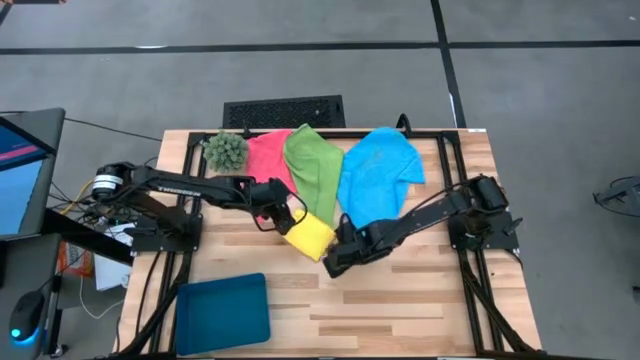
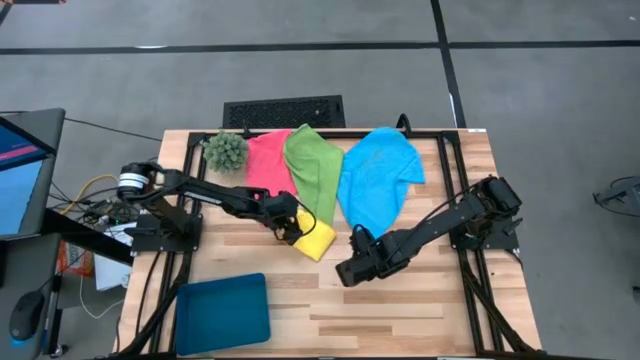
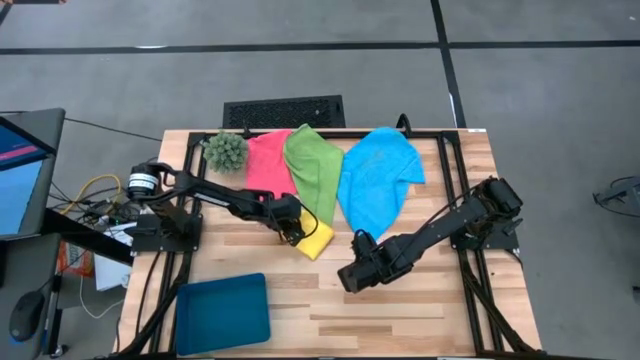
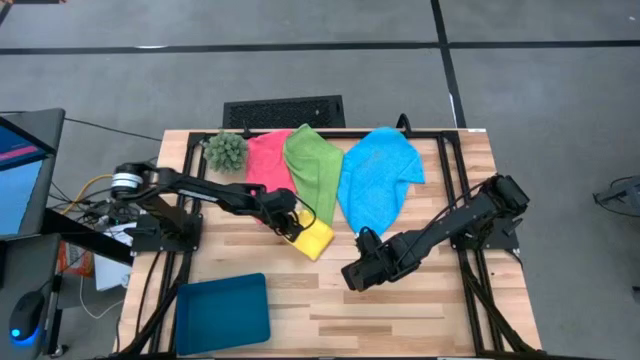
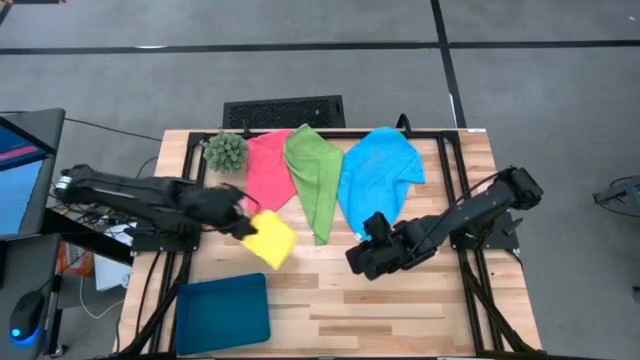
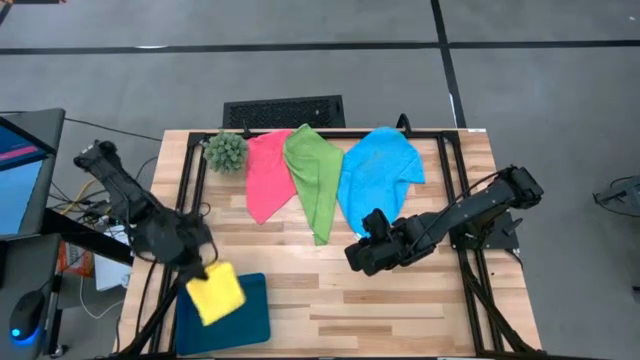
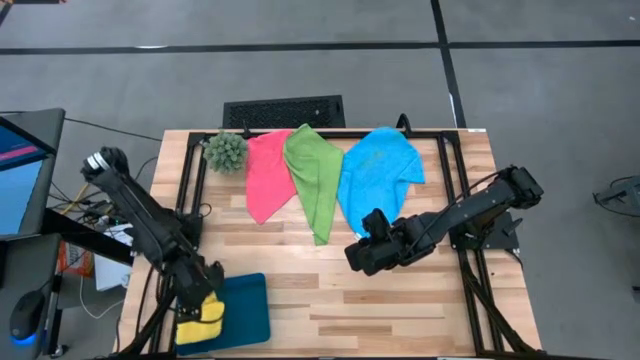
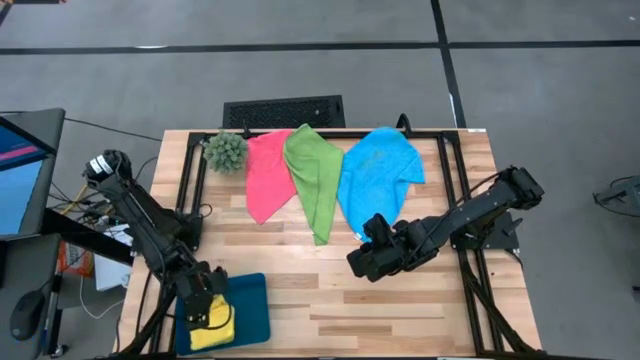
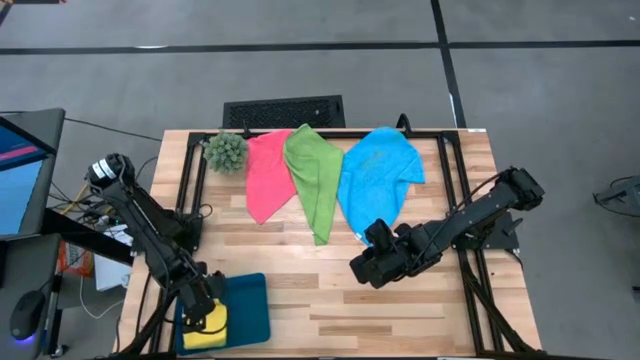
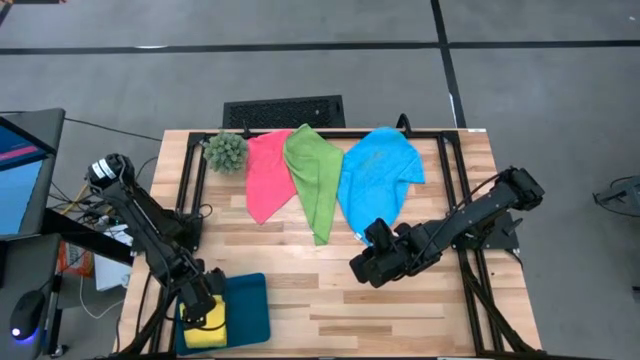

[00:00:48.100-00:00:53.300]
Task: Fold microfiber towels
Put the yellow microfiber towel into the bin

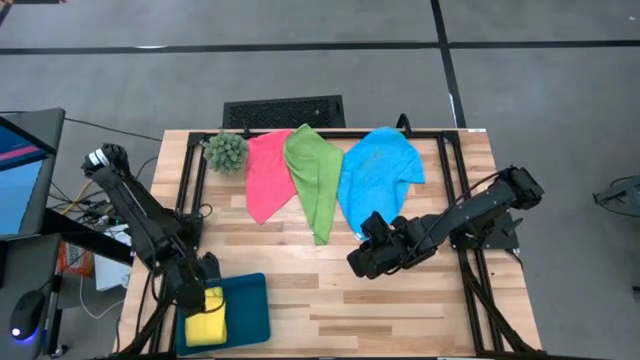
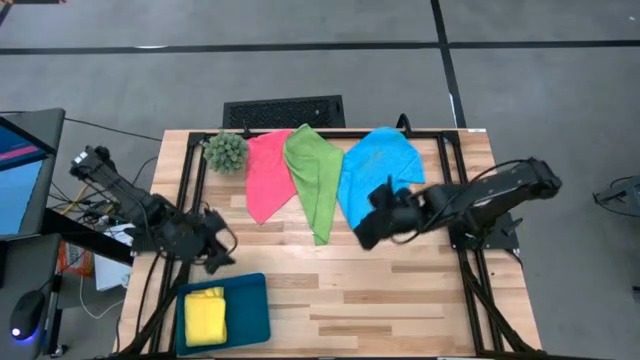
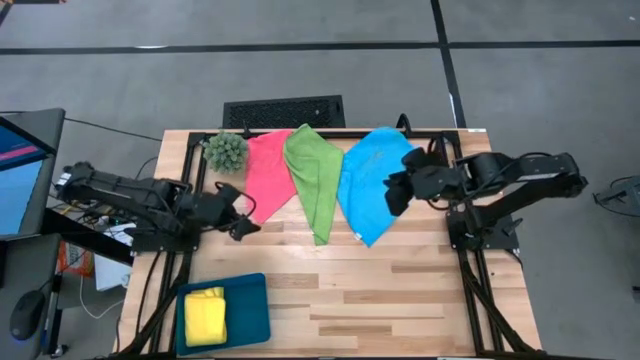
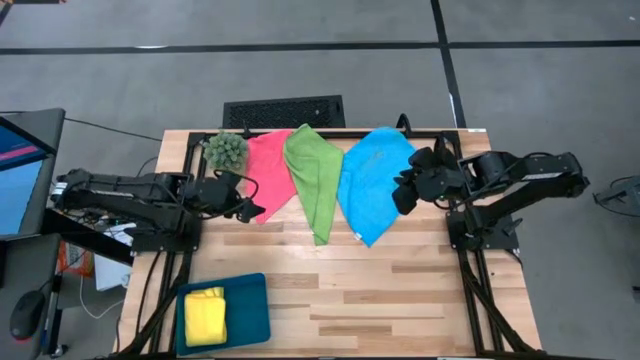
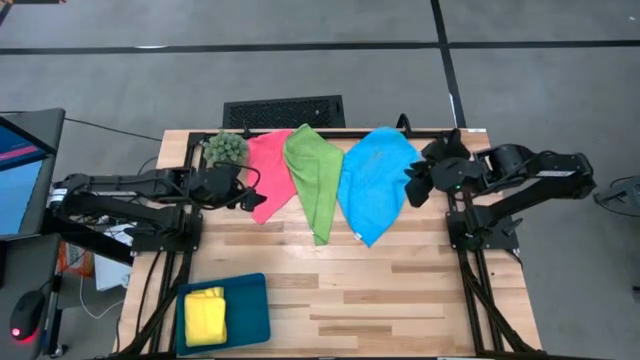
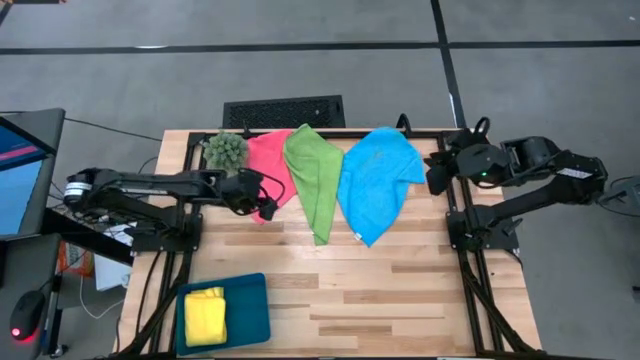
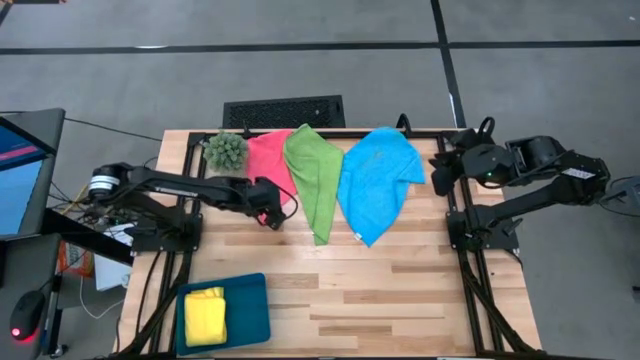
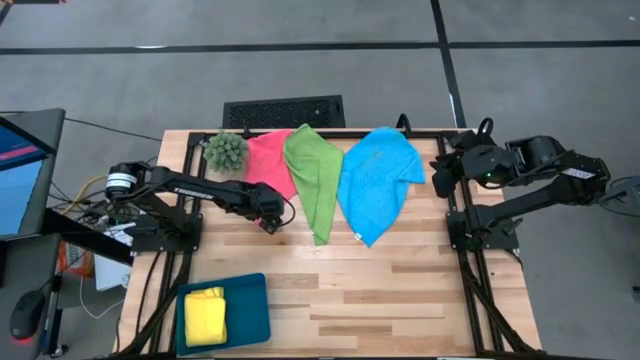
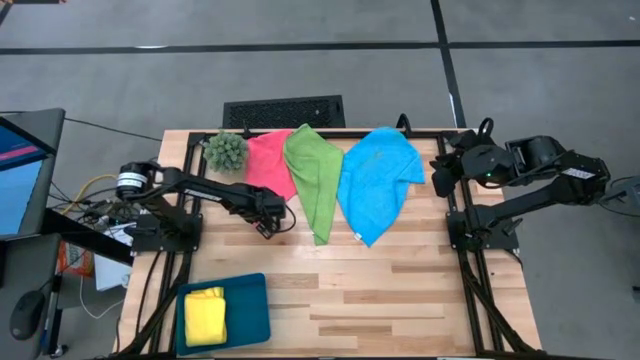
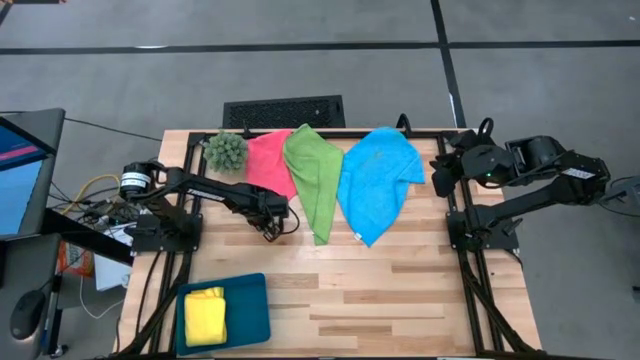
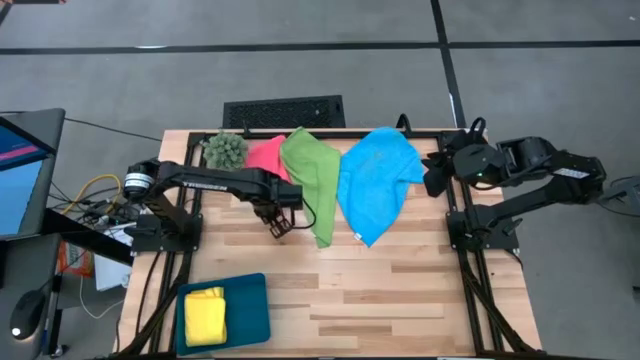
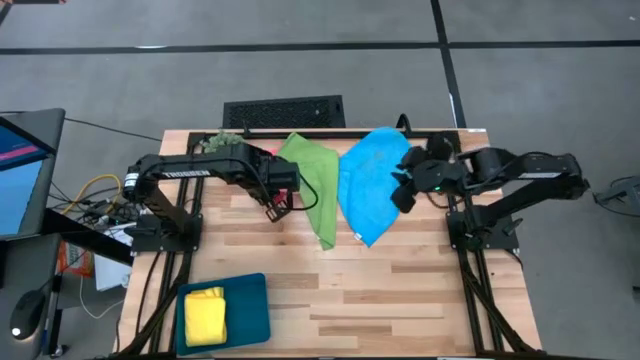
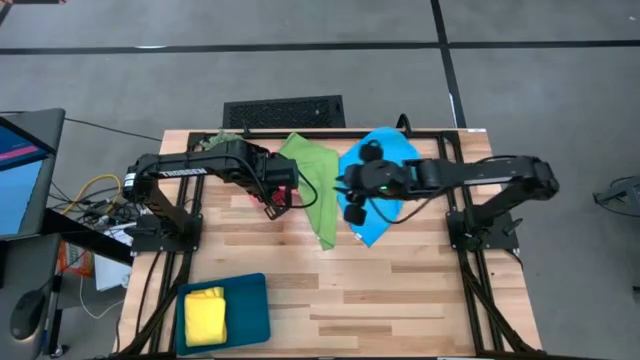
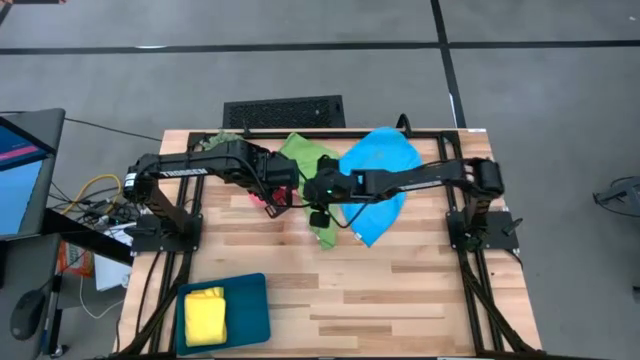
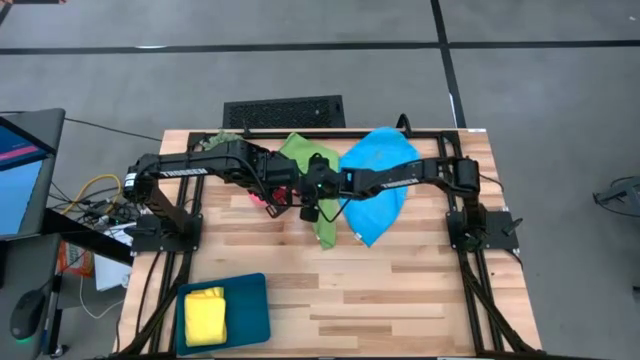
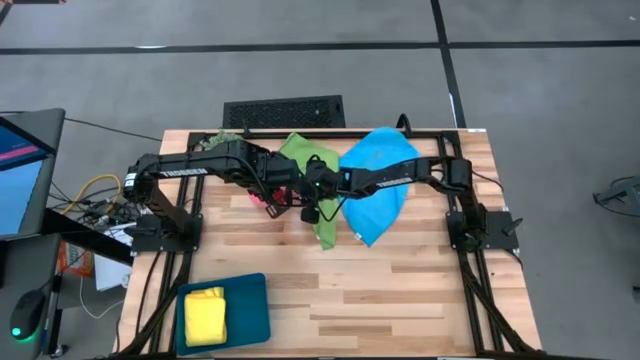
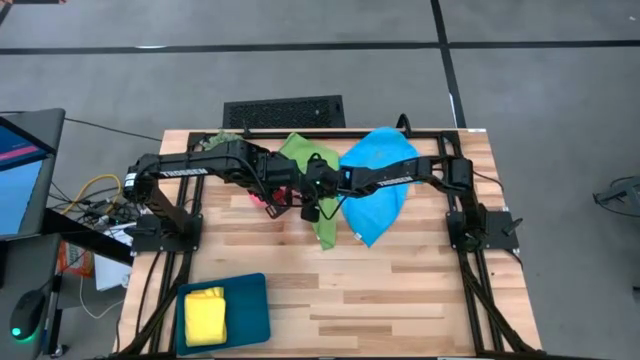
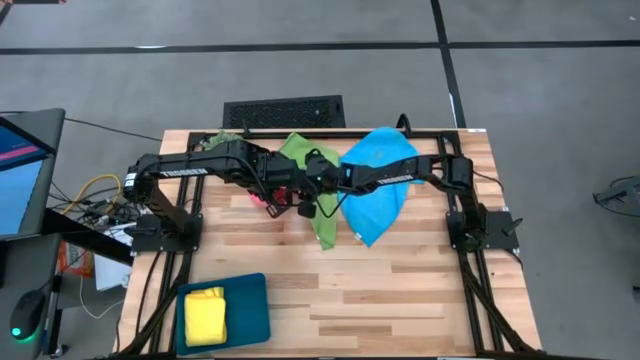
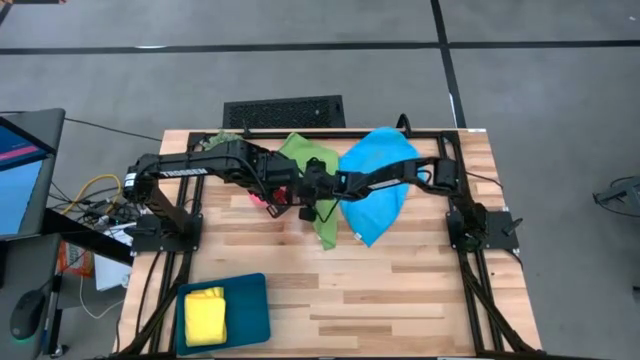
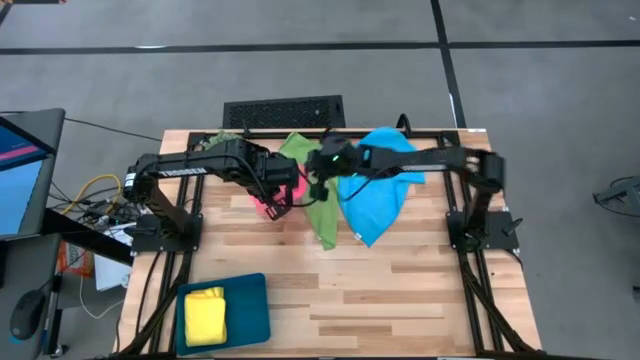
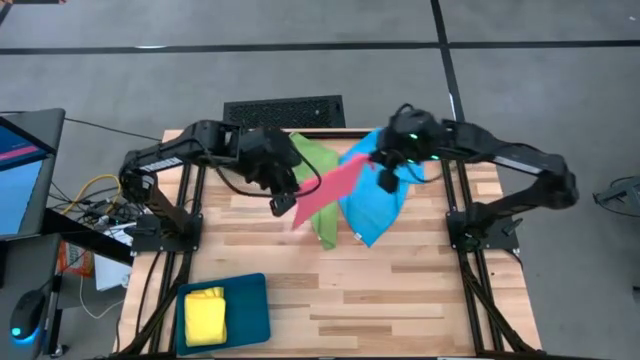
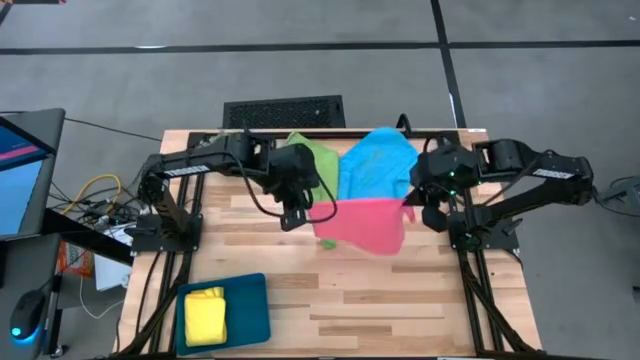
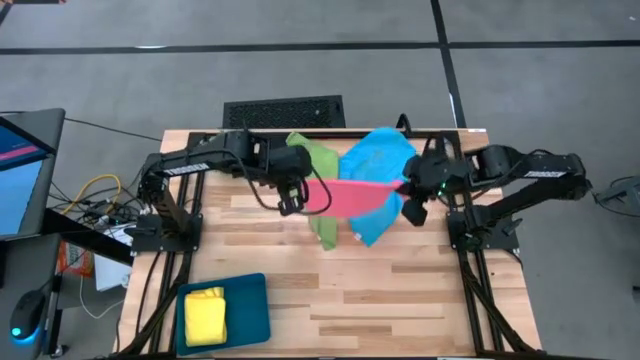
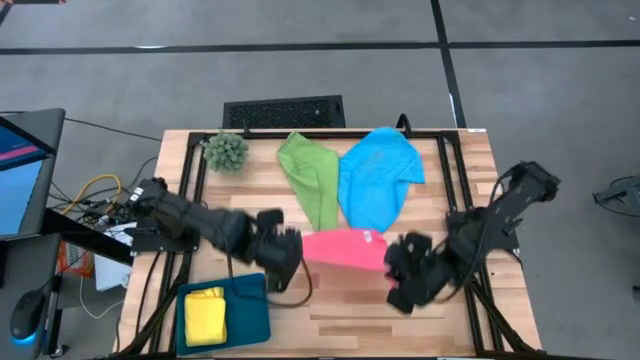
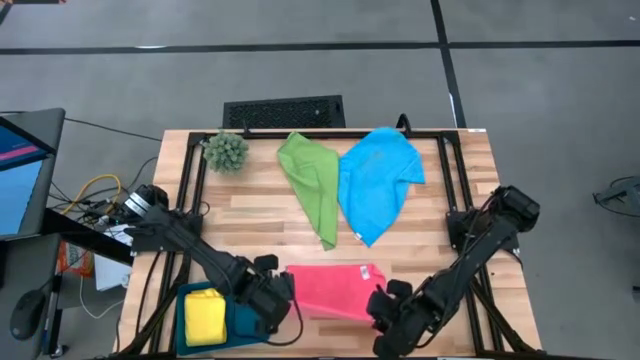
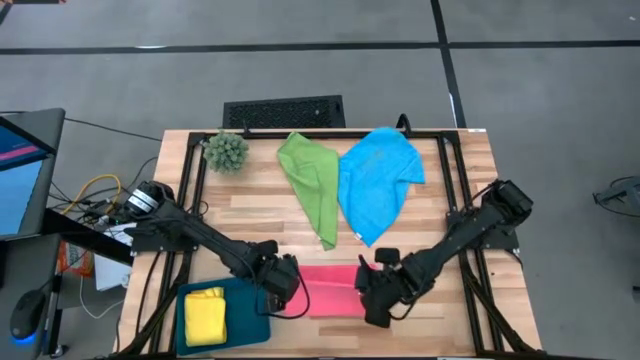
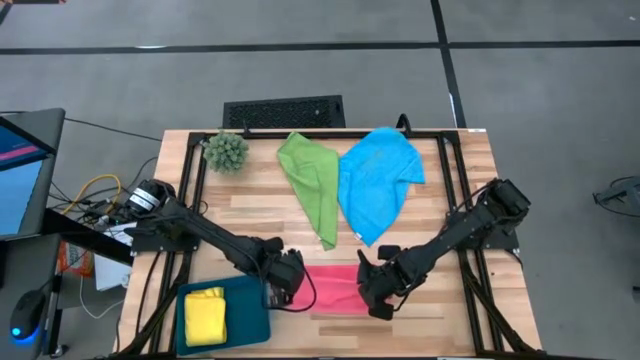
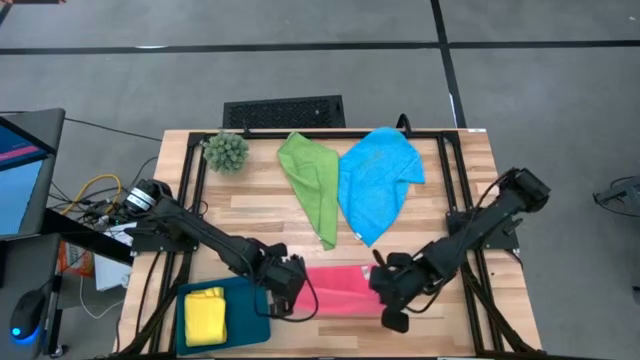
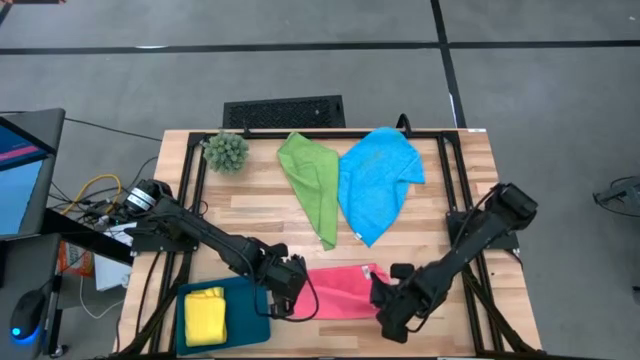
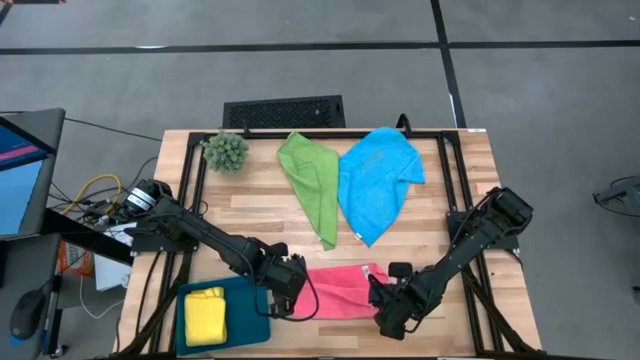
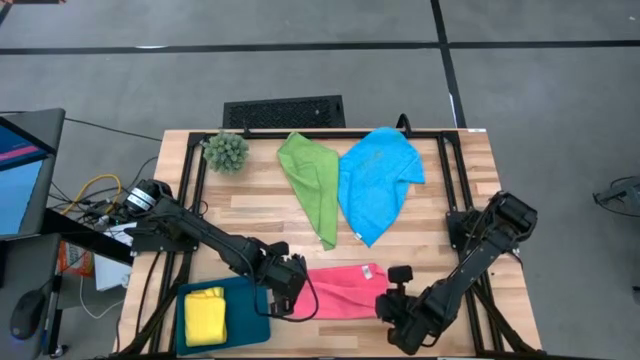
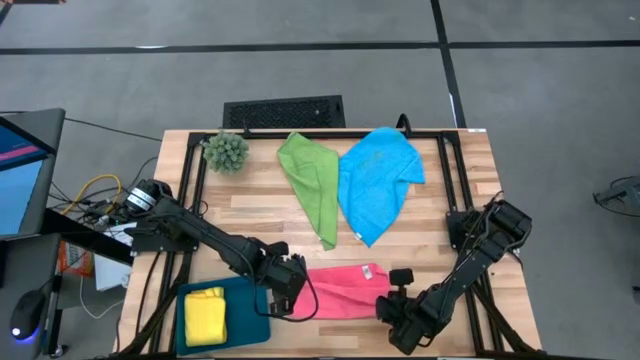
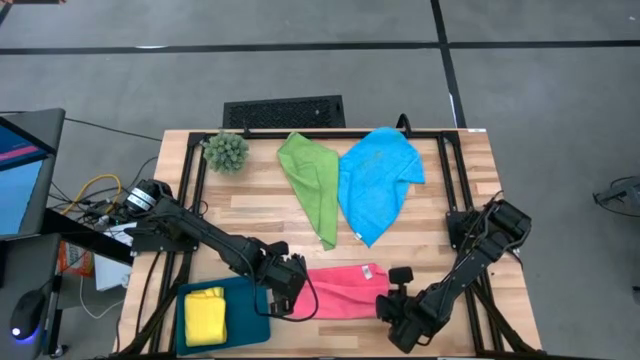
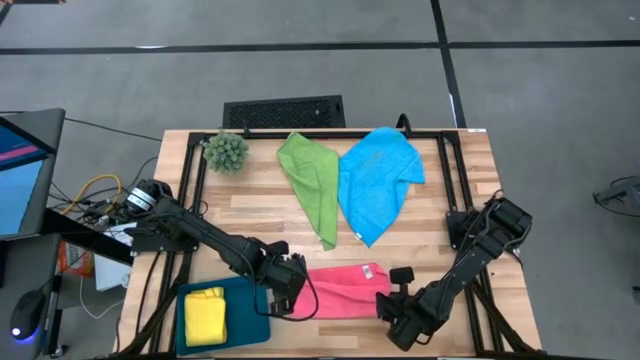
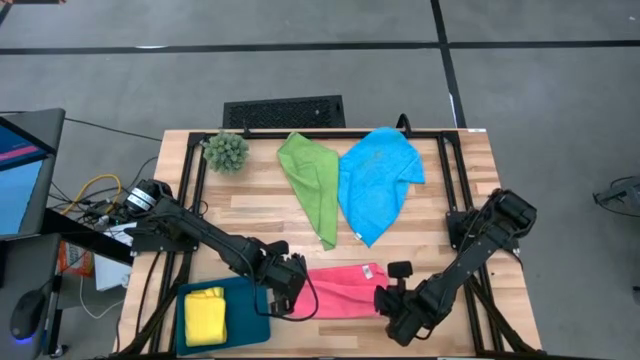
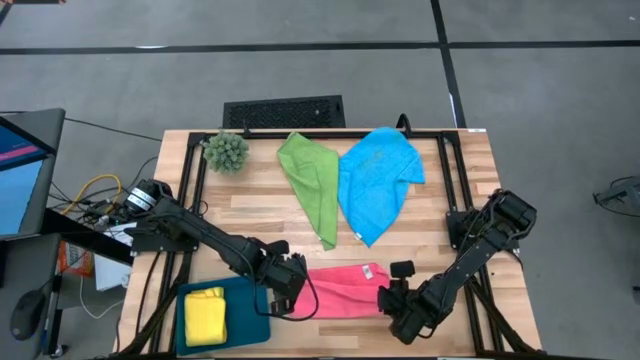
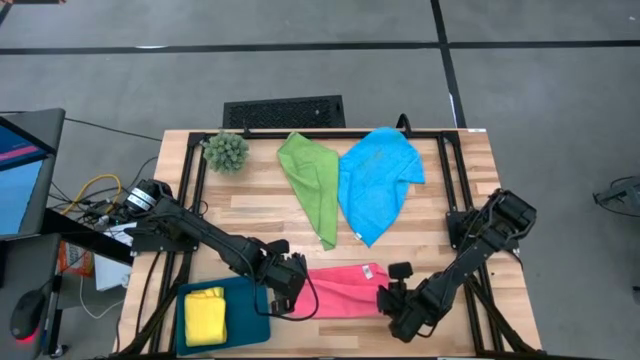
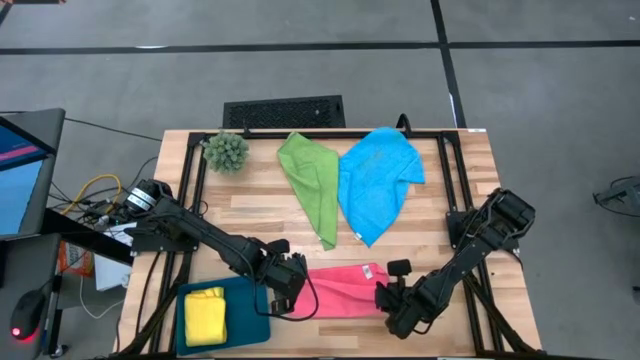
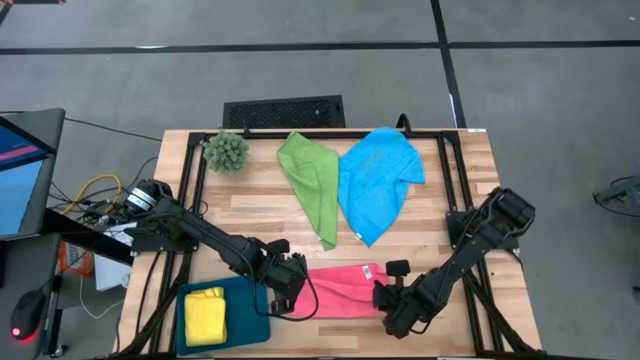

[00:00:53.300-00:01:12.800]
Fold the pink microfiber towel
